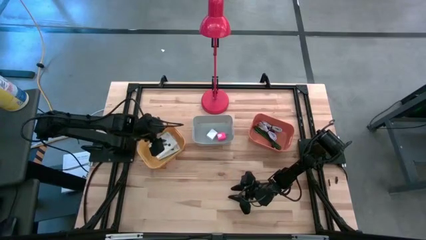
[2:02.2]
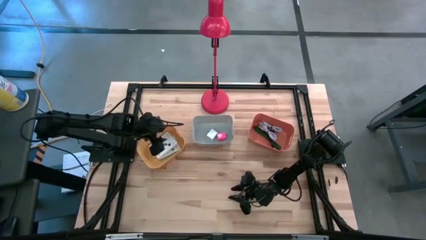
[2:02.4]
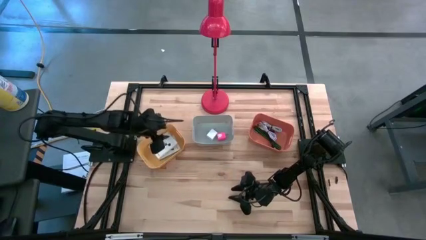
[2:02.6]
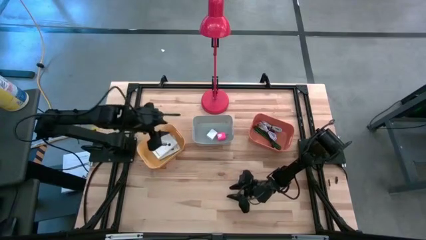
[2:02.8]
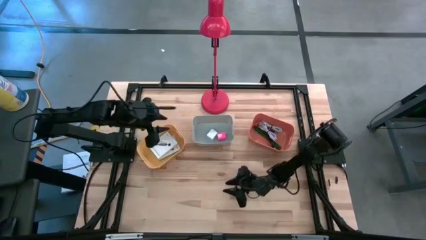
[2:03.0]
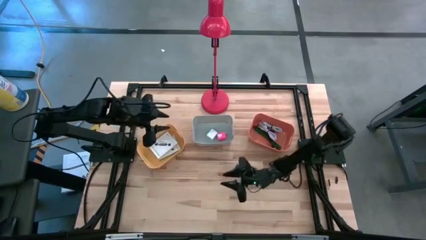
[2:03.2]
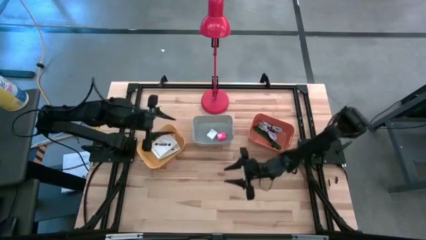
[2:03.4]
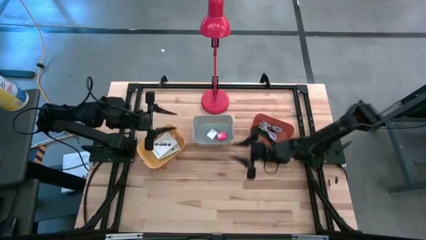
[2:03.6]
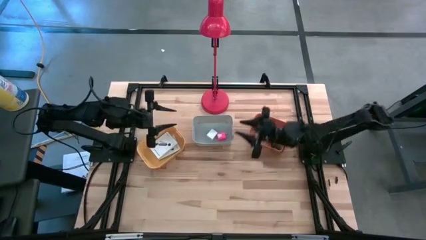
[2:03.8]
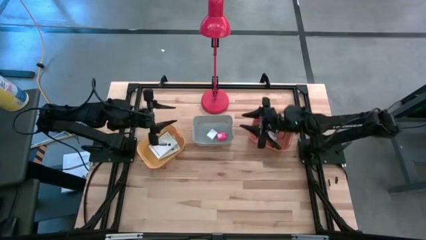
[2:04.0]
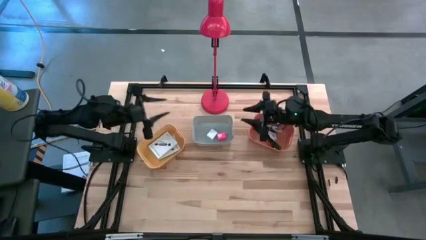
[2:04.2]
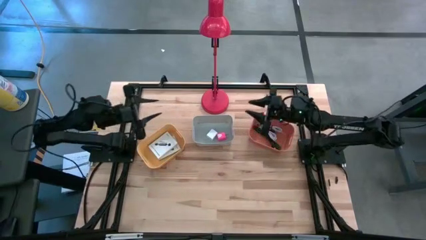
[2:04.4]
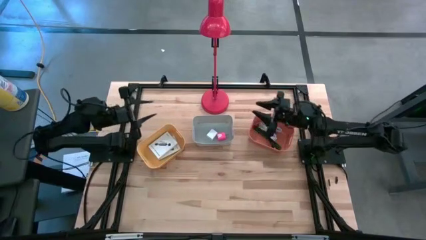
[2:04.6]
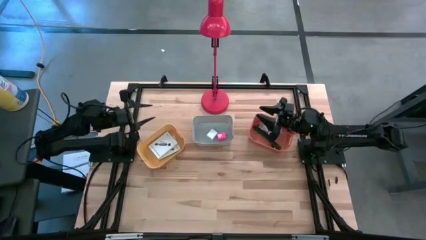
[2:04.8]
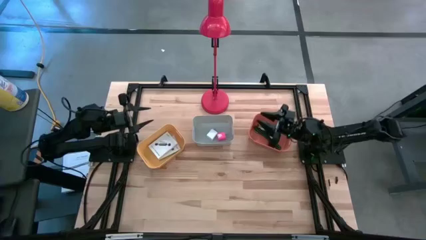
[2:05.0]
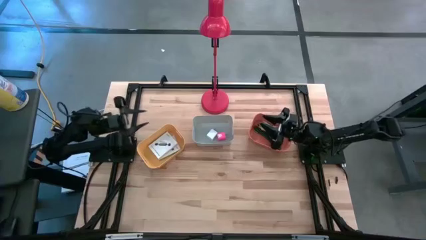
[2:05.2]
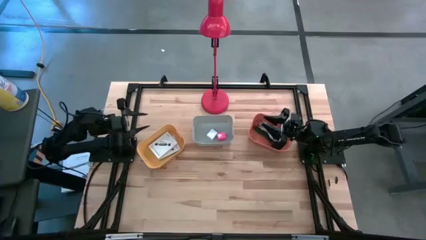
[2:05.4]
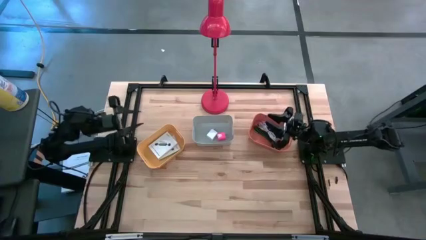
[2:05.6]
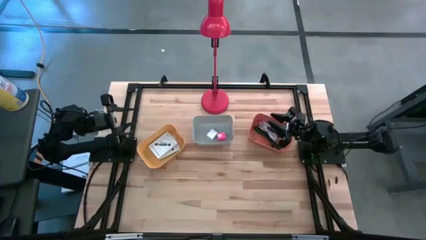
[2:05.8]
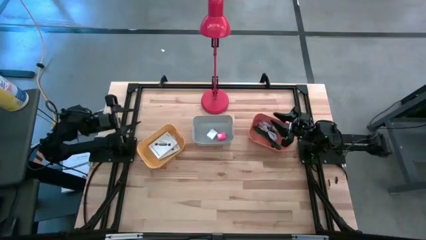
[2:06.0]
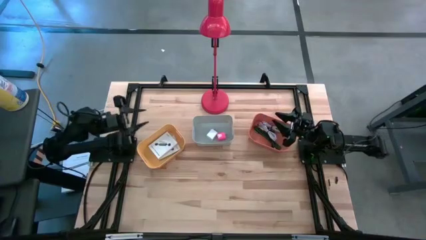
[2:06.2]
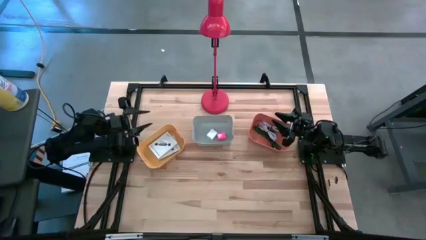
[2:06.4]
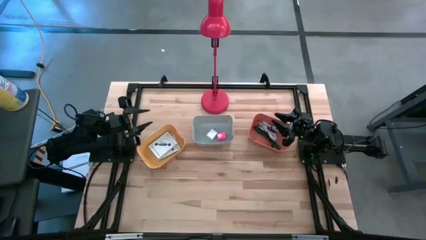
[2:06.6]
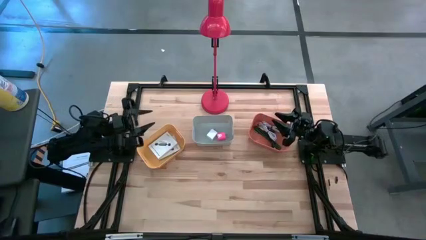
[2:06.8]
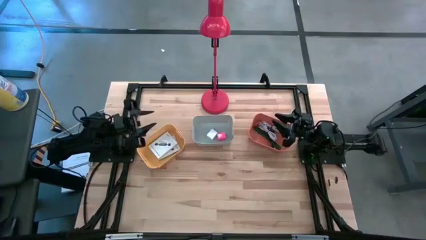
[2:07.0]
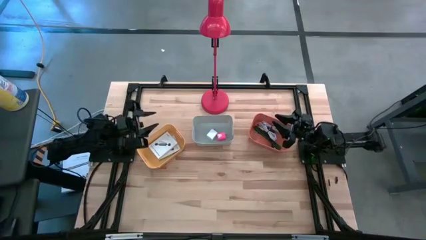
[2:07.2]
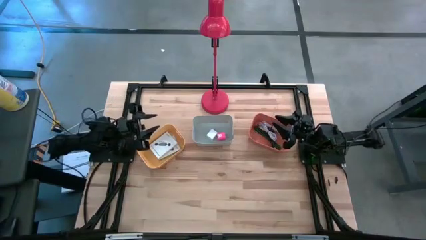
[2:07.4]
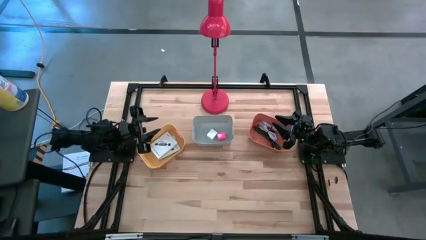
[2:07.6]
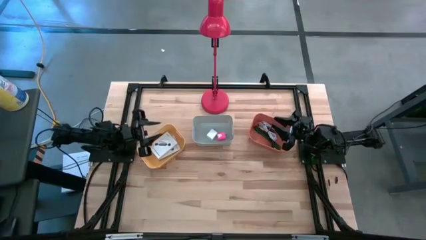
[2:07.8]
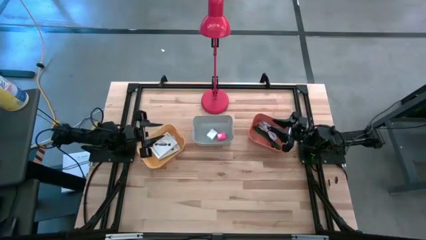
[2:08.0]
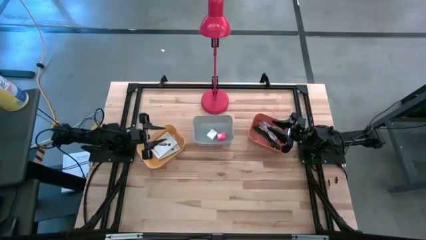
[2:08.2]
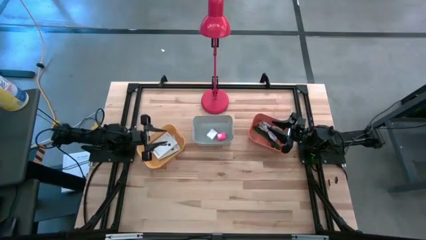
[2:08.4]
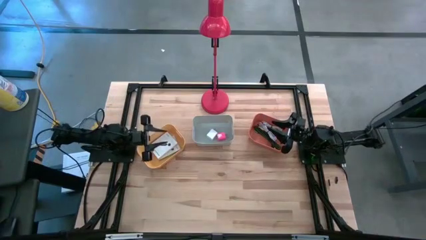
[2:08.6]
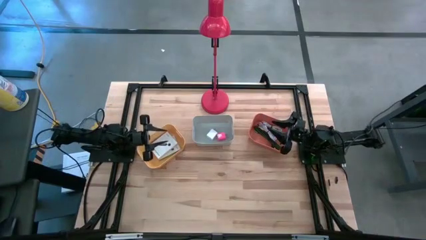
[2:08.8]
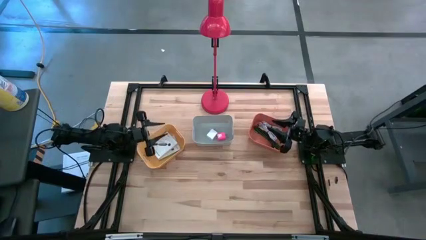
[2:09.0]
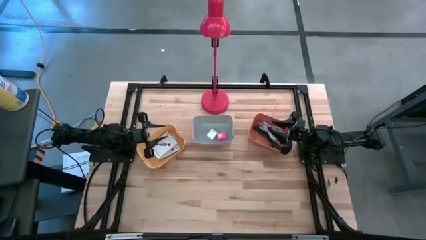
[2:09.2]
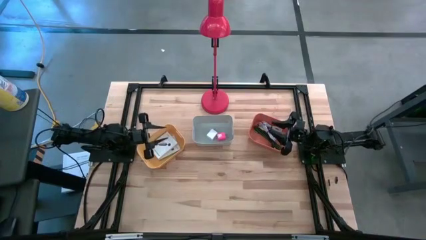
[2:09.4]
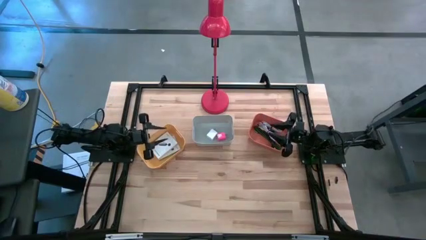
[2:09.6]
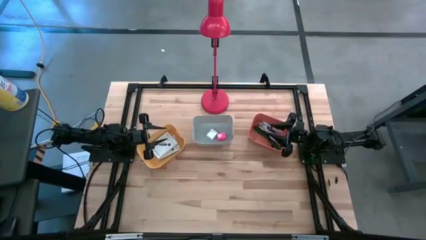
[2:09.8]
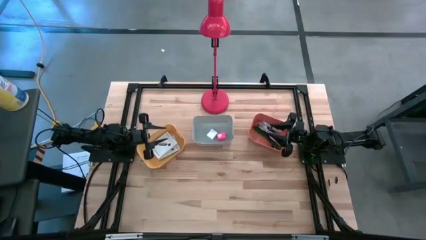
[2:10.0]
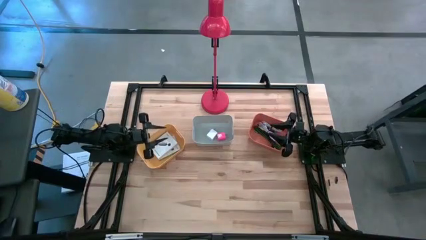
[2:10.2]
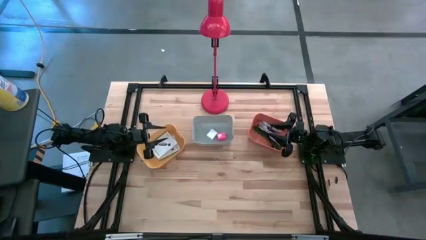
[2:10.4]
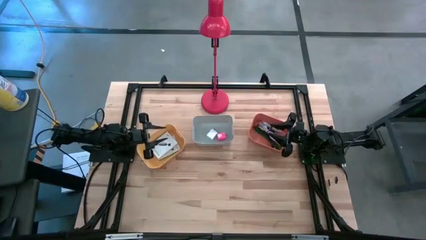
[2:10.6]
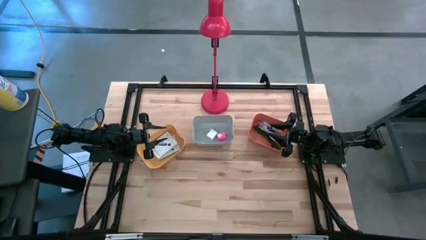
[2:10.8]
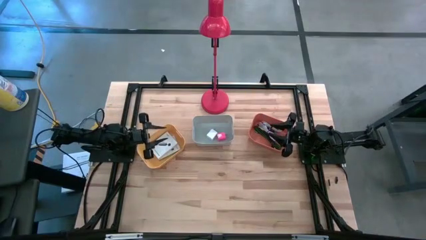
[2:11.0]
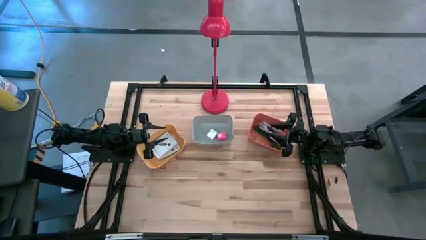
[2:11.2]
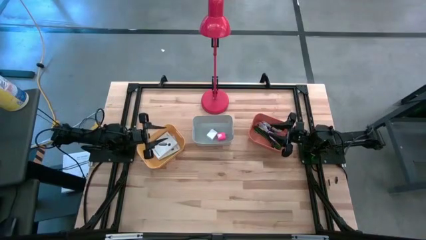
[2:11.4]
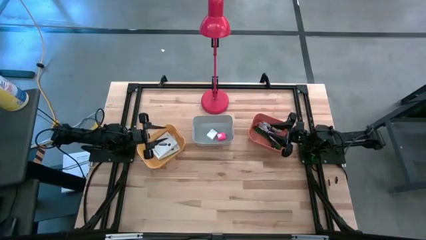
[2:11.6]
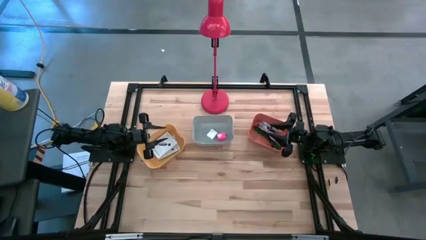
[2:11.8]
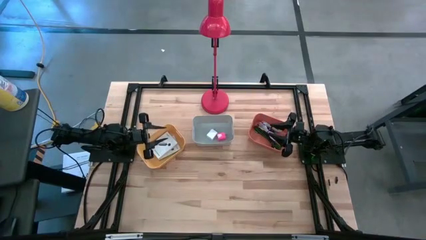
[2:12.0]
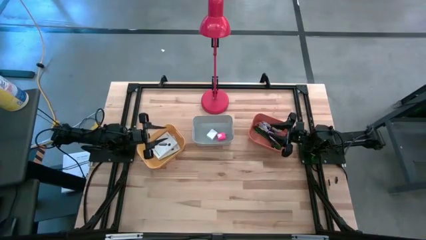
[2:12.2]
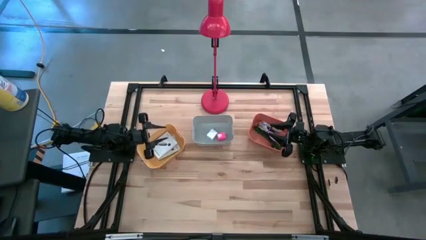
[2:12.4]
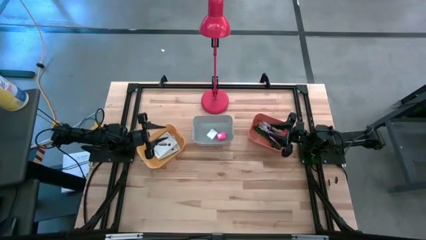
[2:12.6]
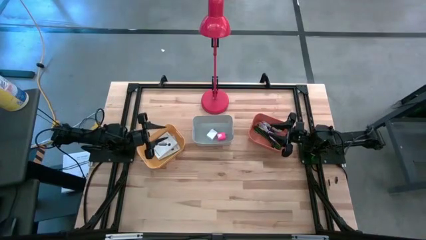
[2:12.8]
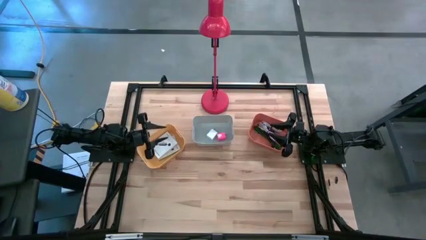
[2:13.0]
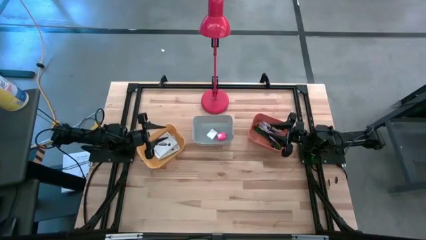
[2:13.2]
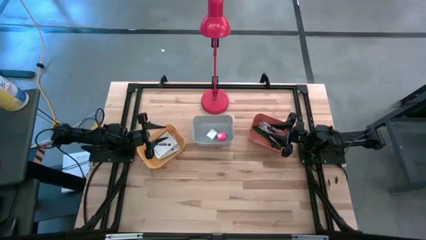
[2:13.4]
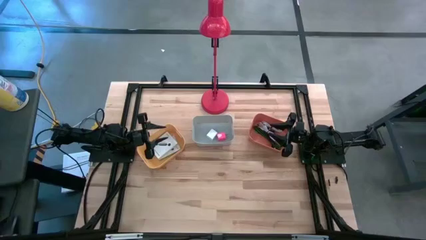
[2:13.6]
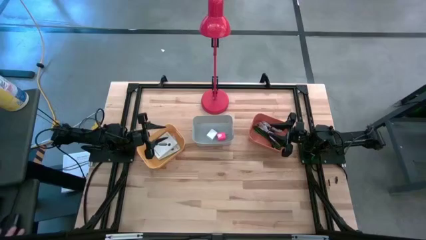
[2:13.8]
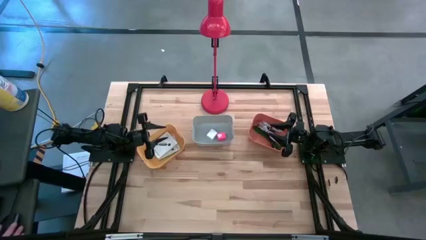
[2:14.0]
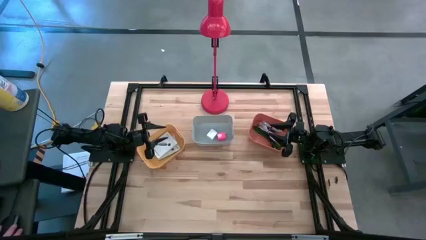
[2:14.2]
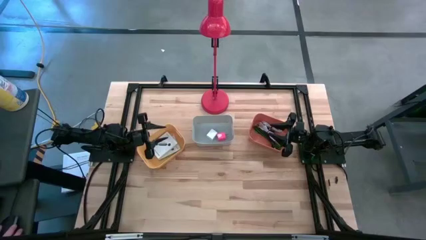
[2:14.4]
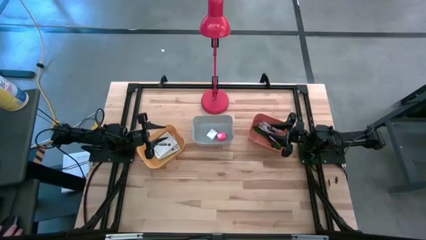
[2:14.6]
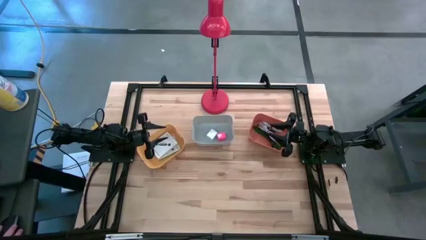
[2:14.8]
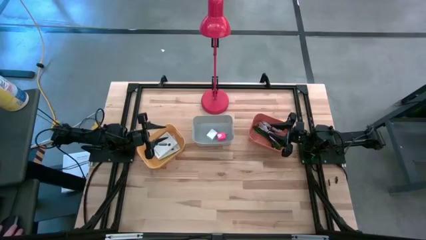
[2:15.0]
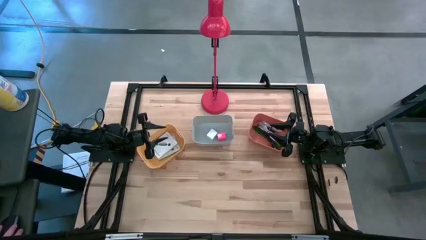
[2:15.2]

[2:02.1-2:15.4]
Task: Pick and place items into bin
Return to Home Position
